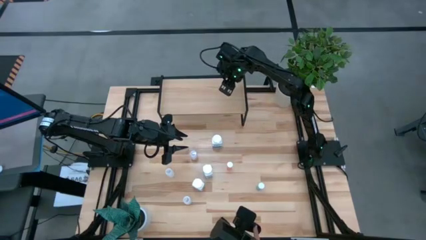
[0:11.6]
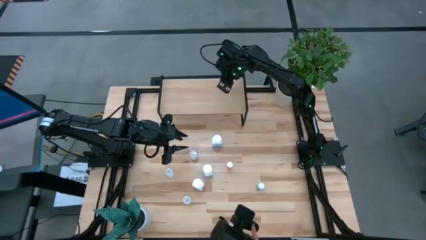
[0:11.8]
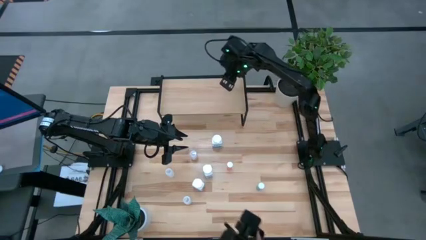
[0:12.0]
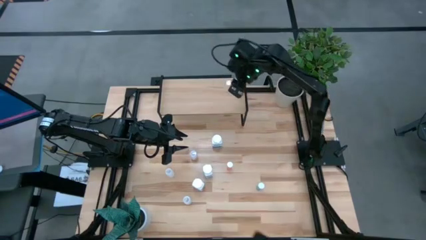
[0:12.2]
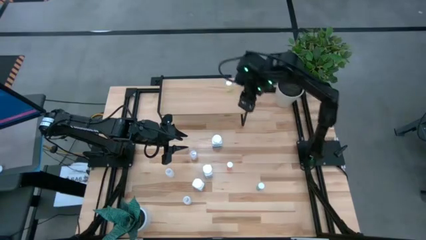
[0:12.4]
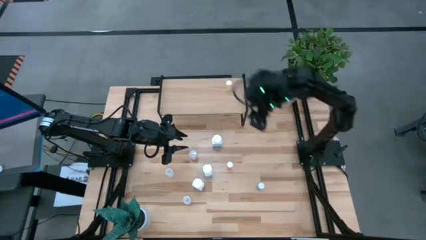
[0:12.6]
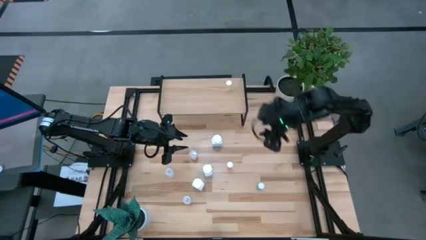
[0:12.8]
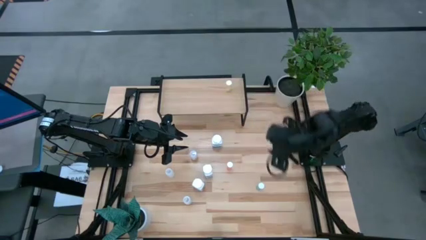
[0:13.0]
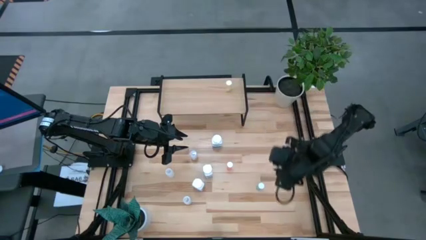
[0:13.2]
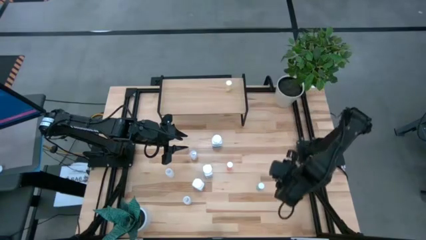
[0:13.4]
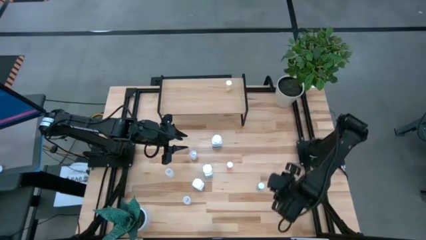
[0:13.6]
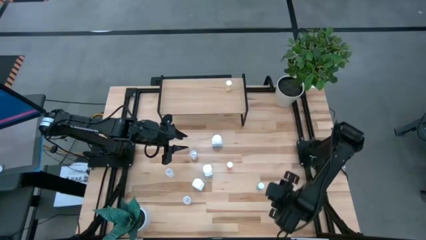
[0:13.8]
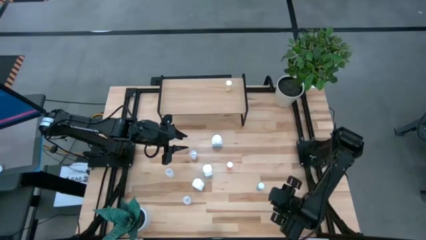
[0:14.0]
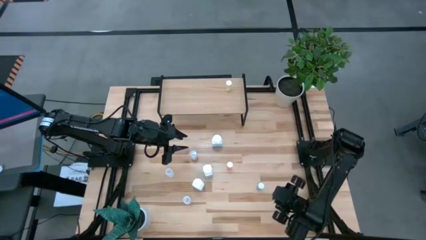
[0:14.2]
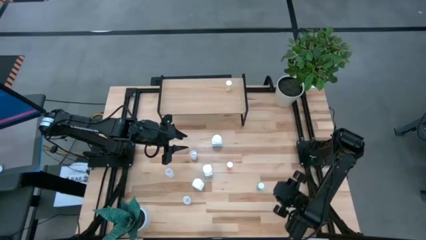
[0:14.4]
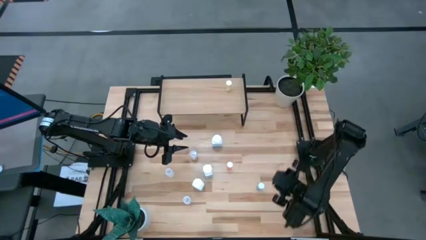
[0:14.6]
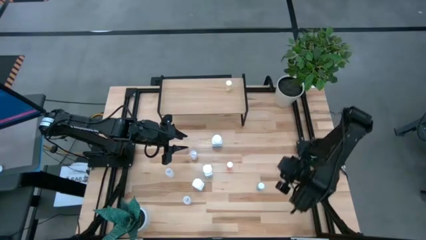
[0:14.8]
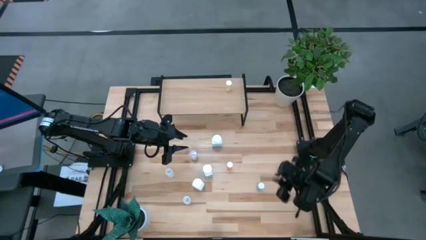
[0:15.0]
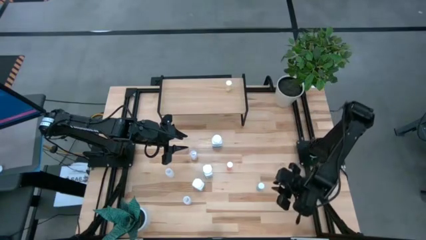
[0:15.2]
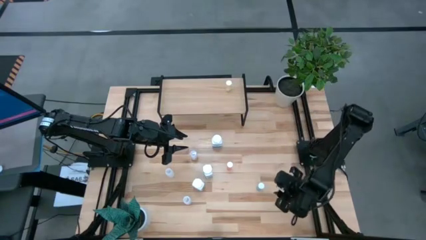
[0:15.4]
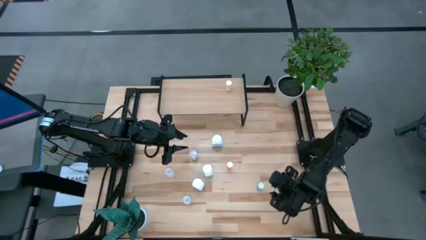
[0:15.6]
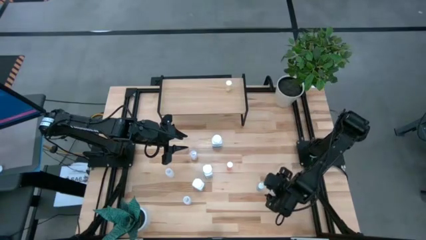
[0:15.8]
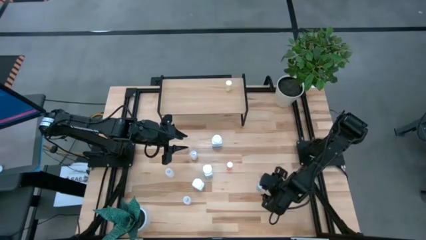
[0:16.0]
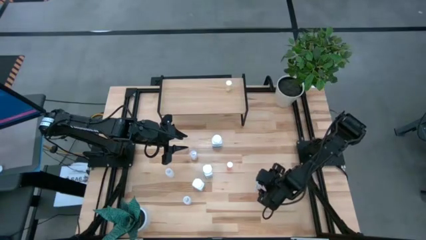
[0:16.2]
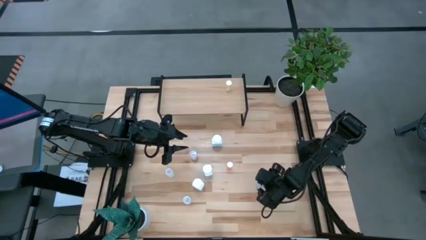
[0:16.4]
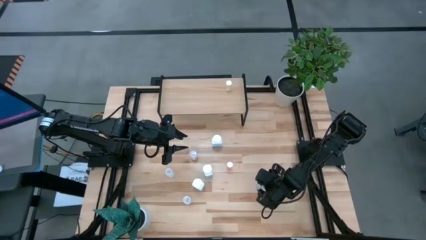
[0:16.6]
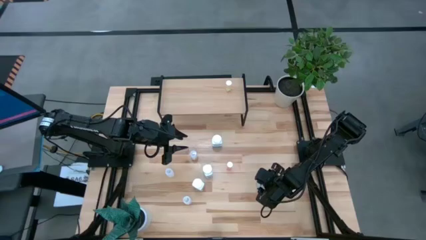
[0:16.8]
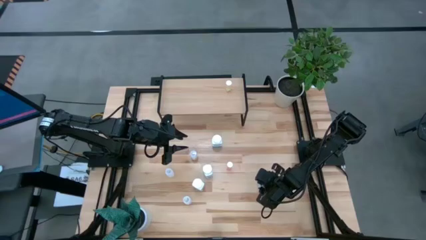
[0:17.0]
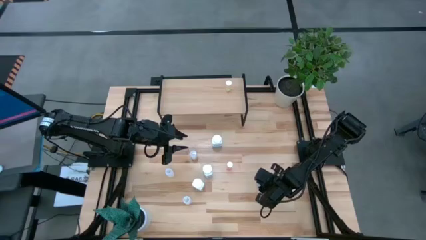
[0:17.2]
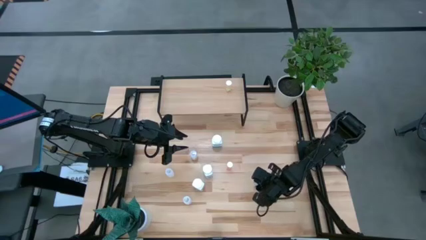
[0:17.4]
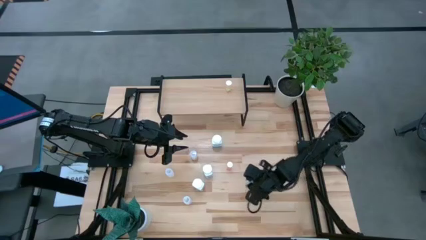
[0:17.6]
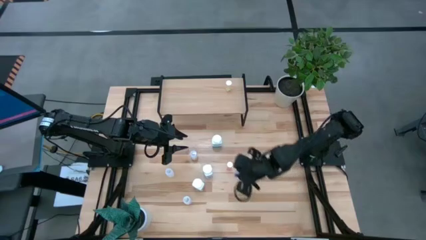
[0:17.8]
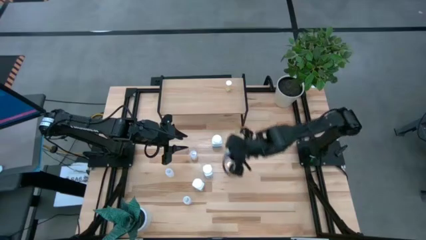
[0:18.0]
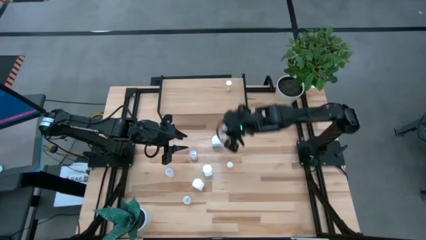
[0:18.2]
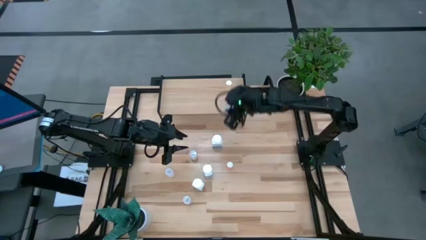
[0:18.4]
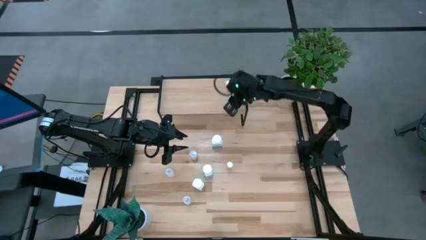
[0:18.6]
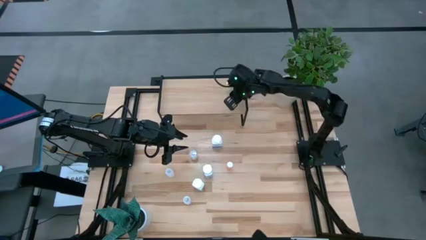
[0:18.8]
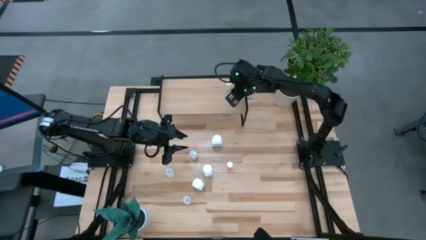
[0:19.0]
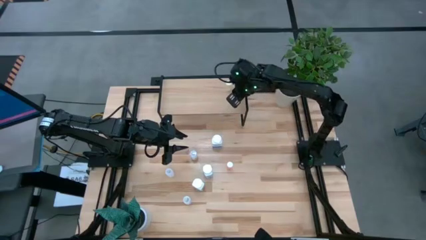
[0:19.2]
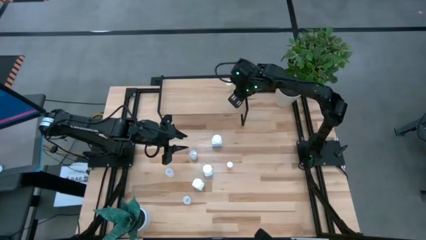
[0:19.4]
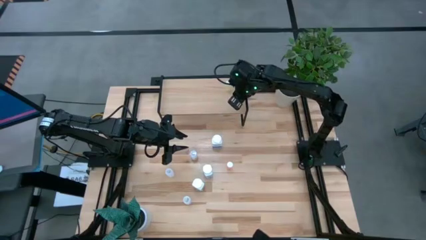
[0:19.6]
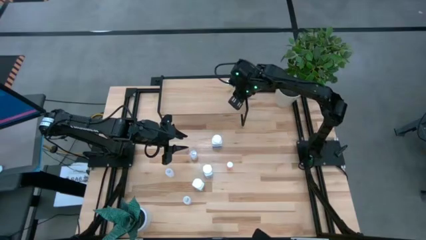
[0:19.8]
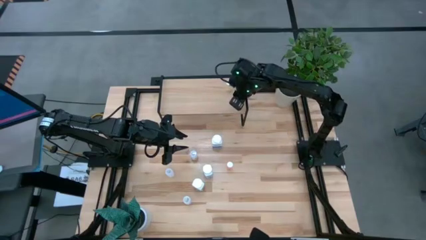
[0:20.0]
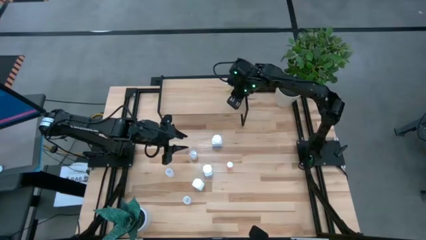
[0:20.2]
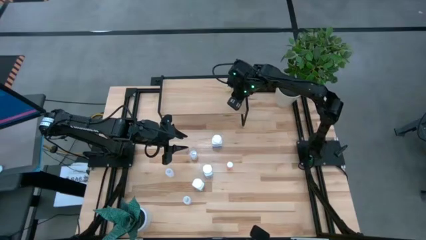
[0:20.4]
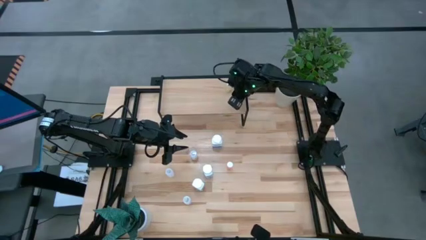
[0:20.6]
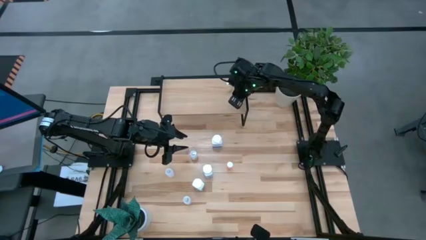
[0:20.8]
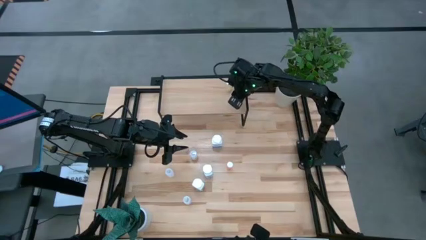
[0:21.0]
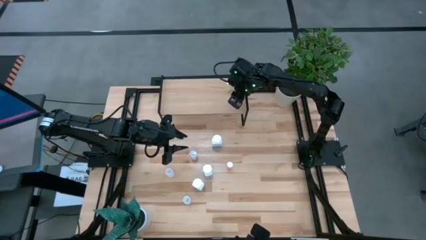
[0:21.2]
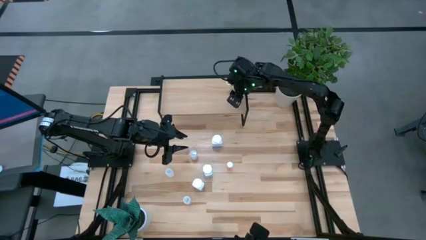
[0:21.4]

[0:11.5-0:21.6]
Task: Pick and place medicine bottles onto shelf by color
Put the blue pill bottle on the shelf

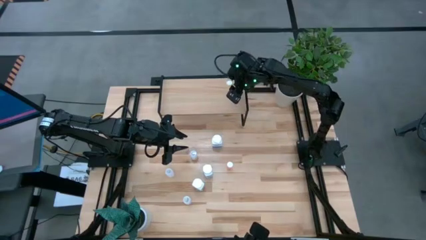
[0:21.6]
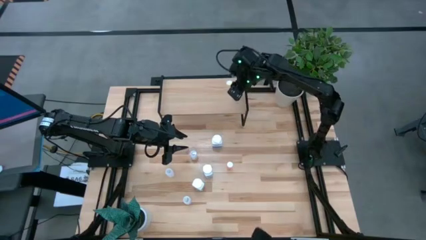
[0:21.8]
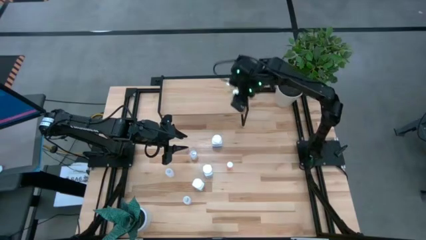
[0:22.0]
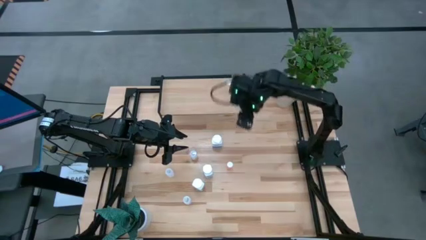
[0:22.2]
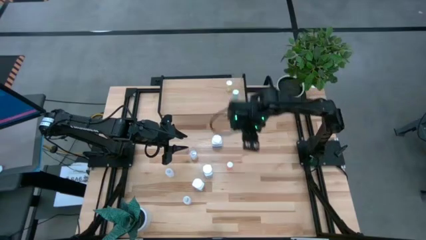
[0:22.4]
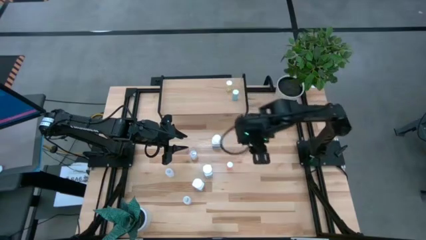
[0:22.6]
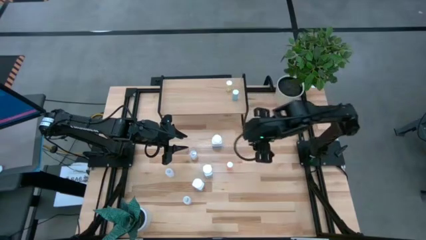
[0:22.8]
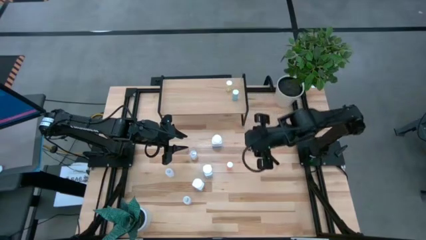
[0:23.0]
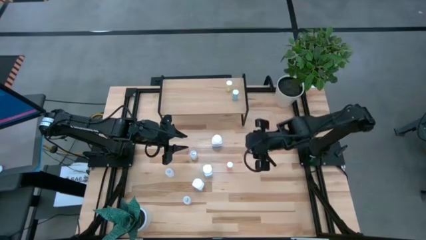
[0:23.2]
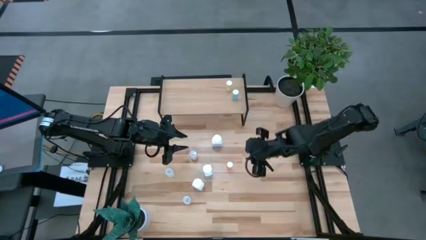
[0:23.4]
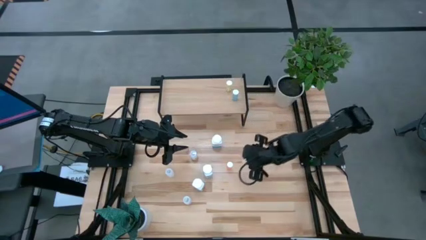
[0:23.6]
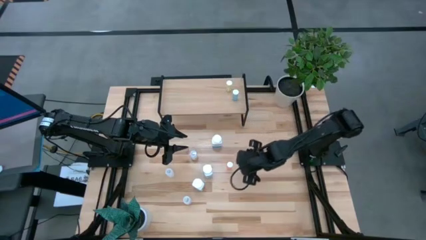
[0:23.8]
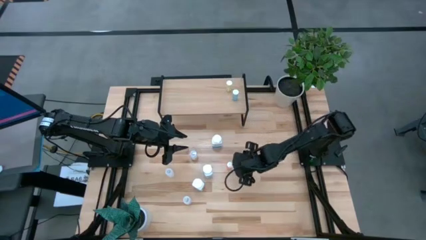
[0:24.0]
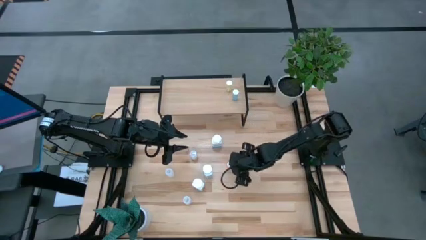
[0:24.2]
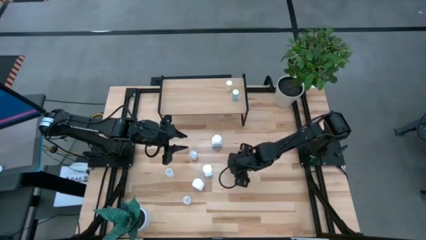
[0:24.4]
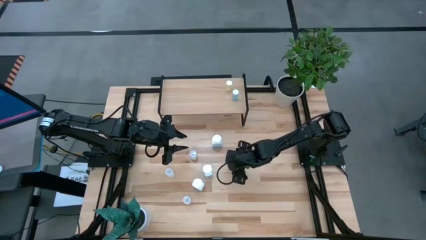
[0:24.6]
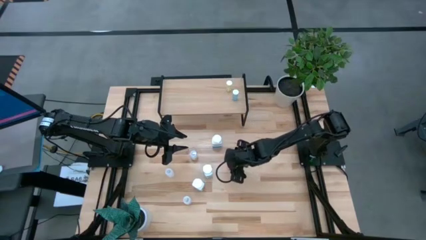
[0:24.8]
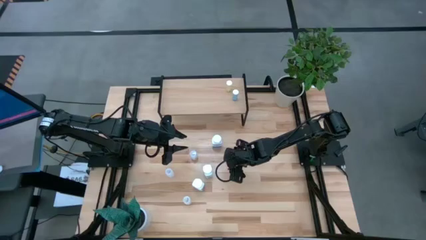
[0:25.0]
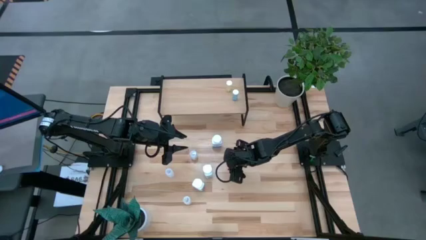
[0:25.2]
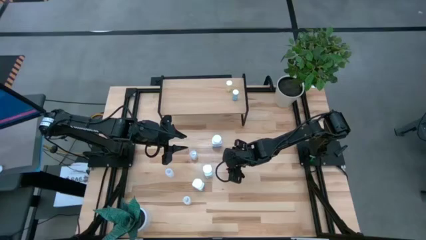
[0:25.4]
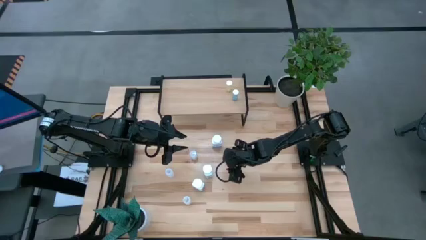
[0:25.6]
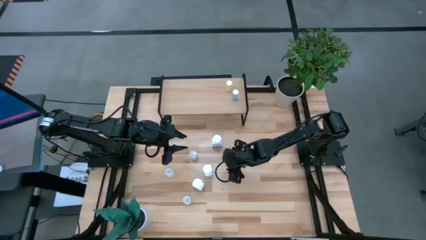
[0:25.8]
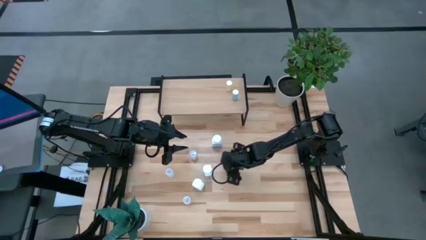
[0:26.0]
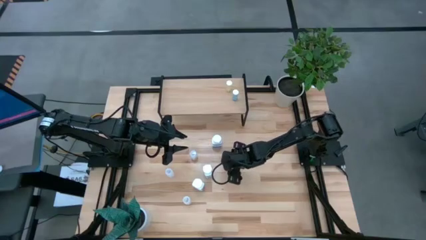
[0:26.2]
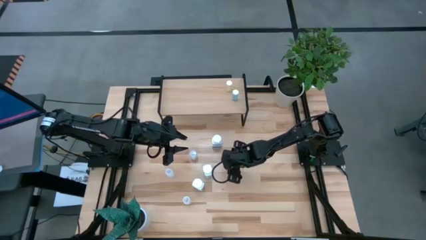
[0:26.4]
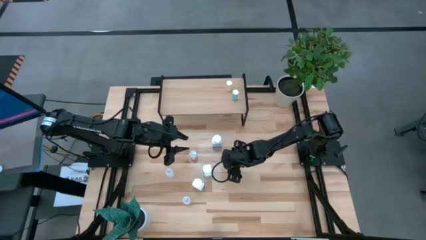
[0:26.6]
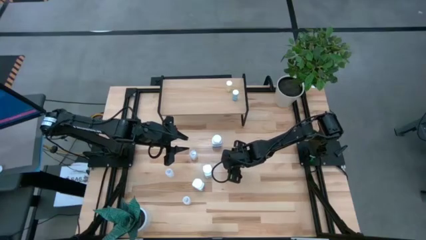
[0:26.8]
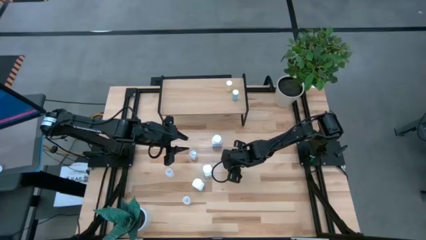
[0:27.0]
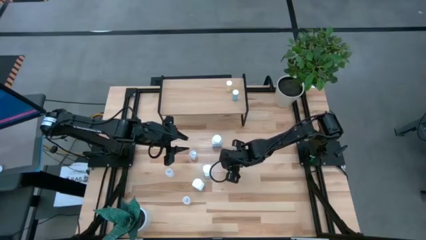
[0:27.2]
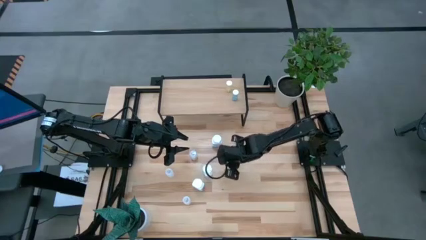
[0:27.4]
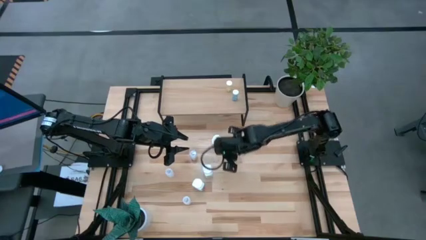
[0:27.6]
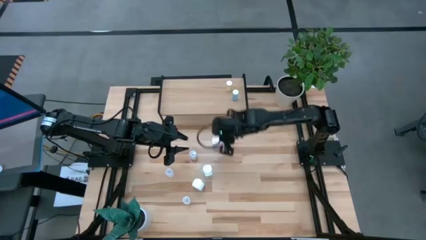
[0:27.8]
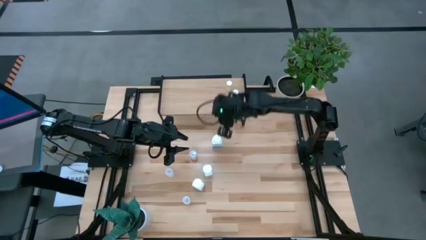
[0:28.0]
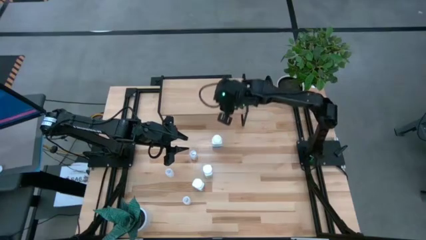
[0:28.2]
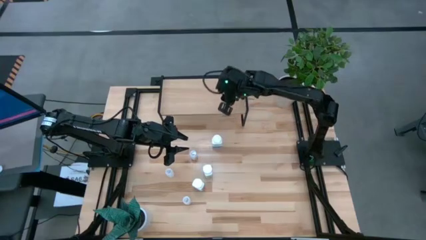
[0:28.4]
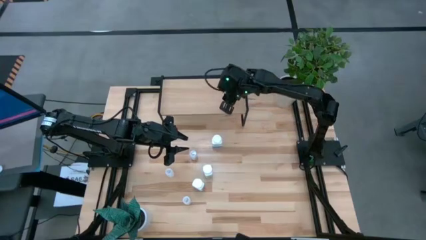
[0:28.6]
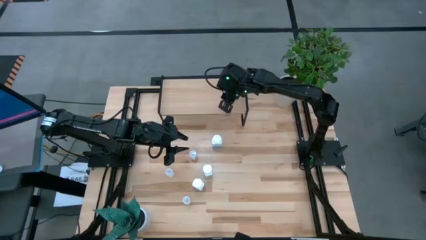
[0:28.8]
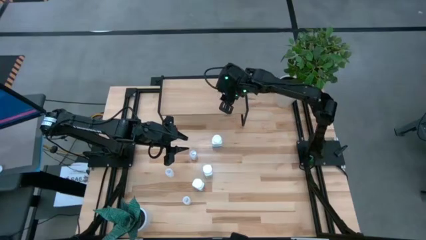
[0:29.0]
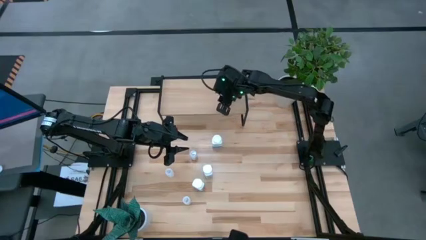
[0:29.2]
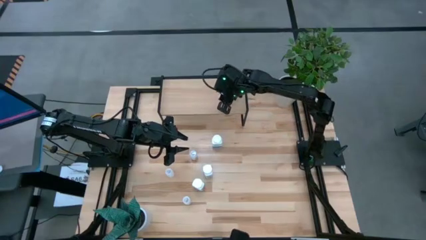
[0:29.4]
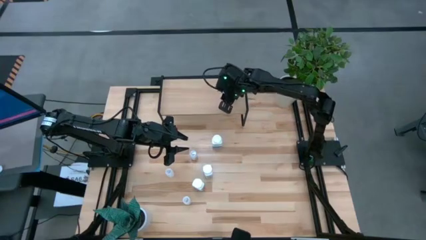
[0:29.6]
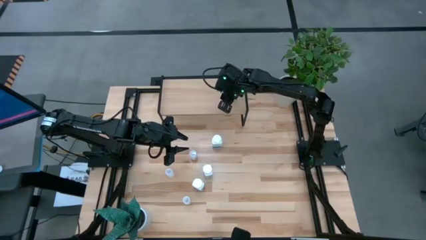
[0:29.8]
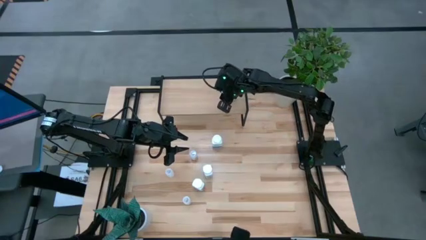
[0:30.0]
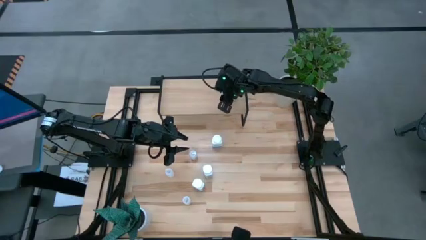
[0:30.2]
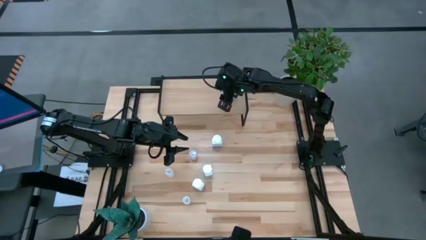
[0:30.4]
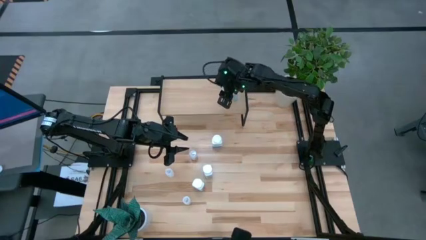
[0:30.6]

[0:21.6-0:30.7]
Put the pink pill bottle on the shelf
